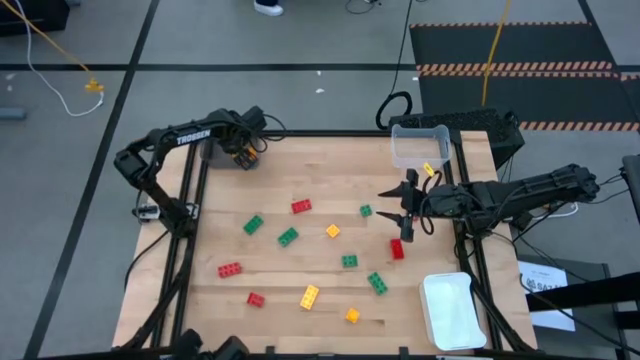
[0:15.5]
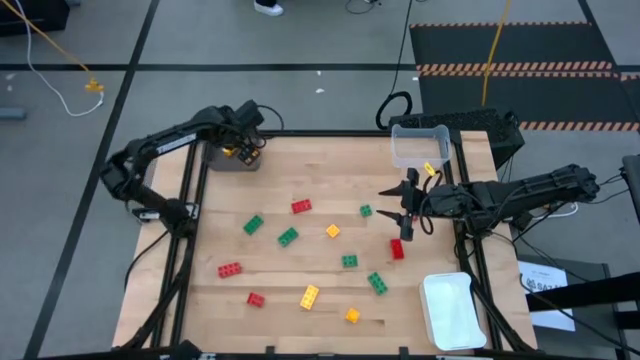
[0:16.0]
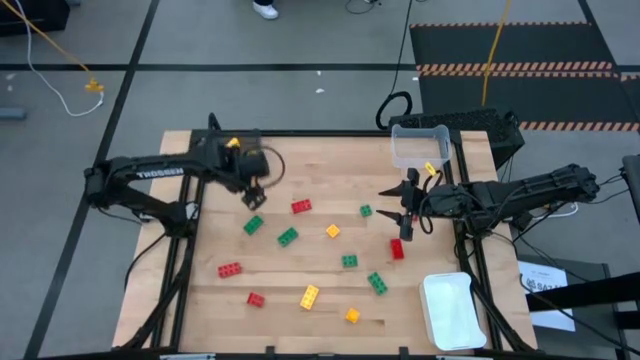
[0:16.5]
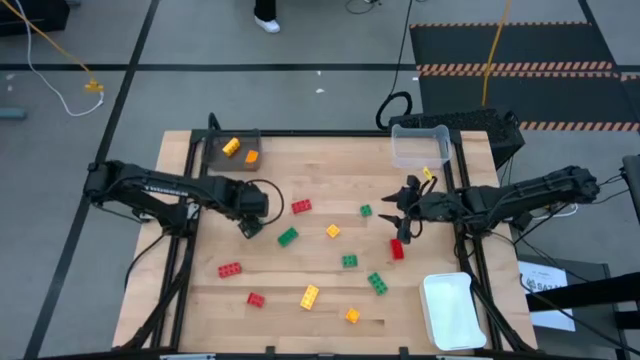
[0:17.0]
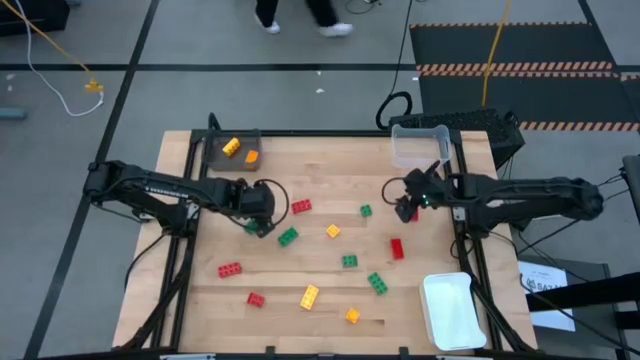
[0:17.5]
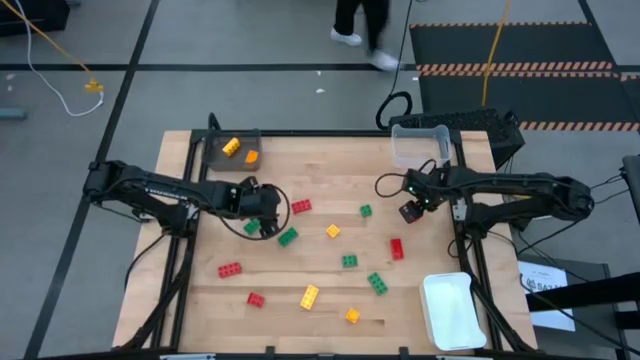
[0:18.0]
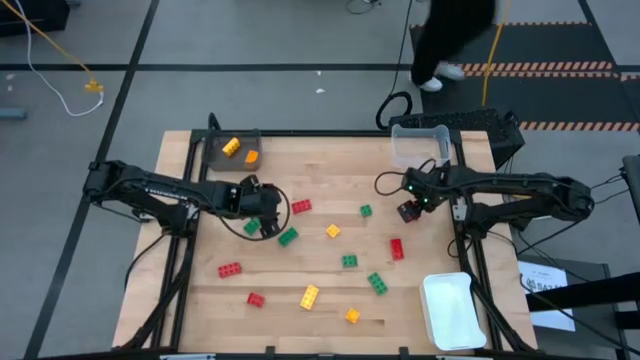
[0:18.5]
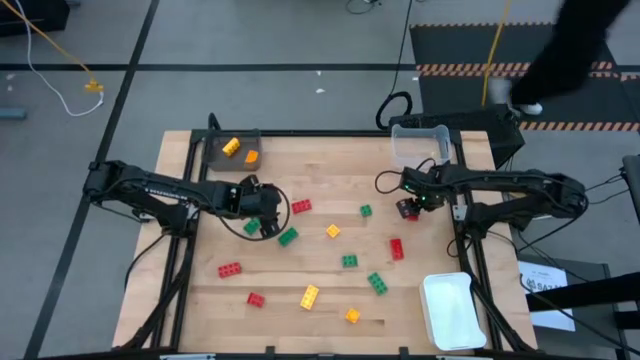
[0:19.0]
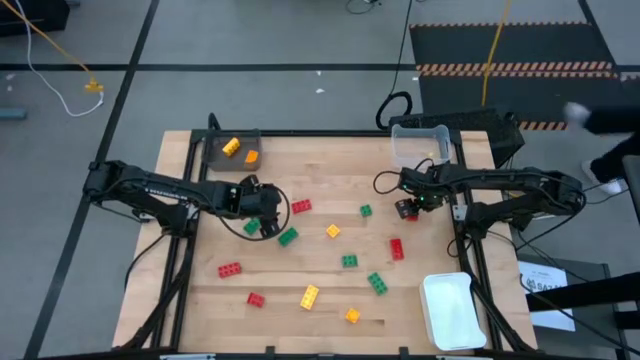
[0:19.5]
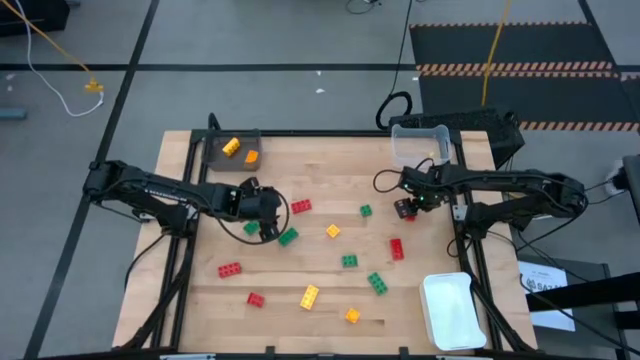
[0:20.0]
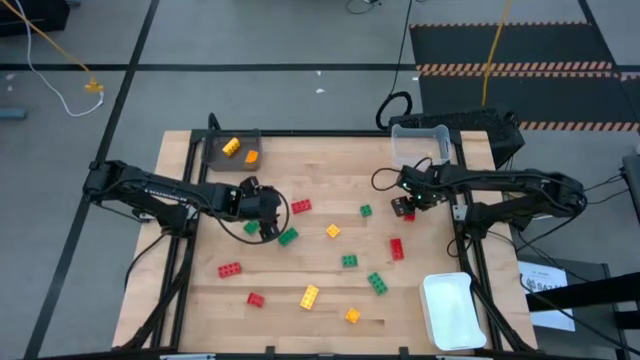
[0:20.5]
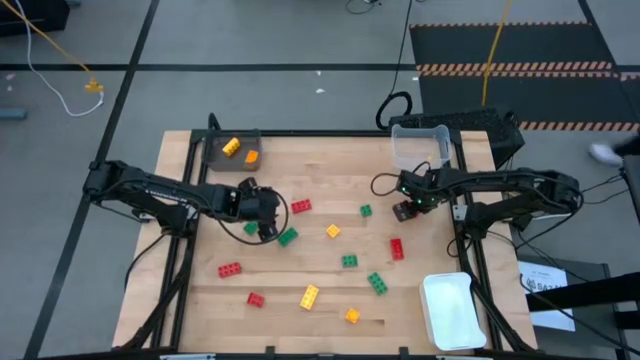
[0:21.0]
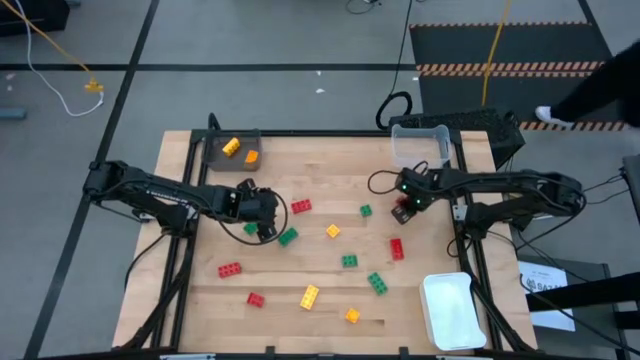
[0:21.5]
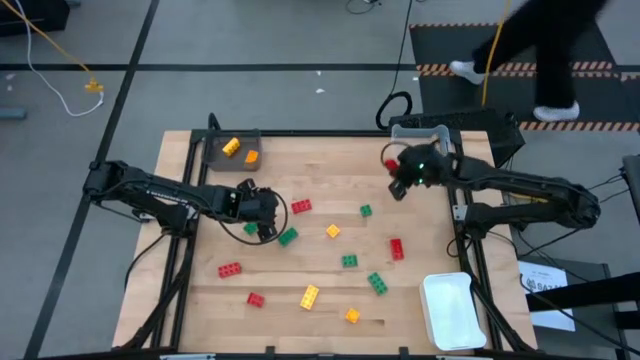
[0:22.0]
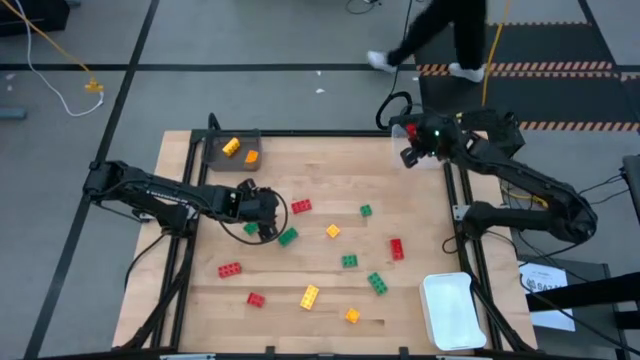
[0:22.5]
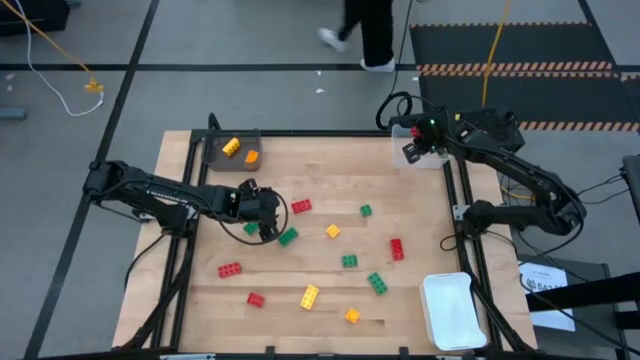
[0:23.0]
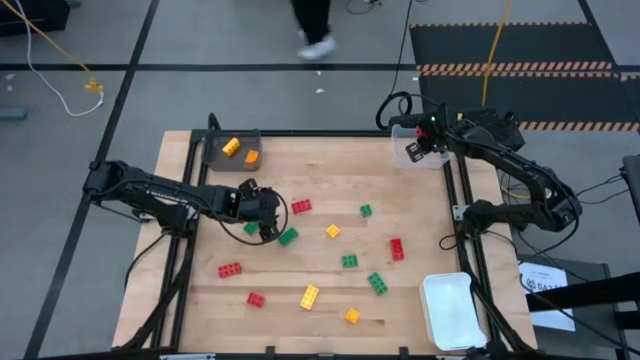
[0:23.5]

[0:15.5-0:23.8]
Task: Sort & place blocks by color
Put the red gamepiece into the transparent bin

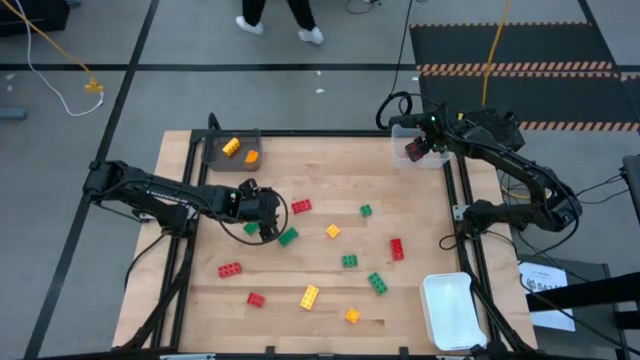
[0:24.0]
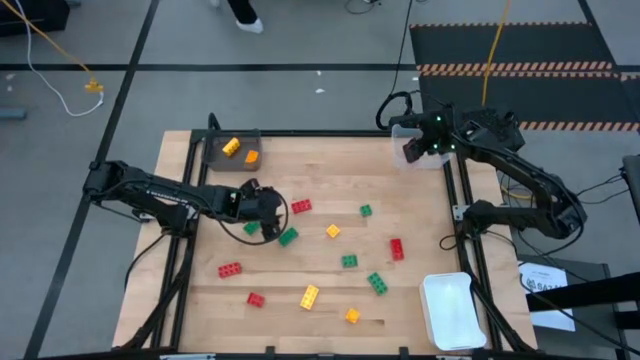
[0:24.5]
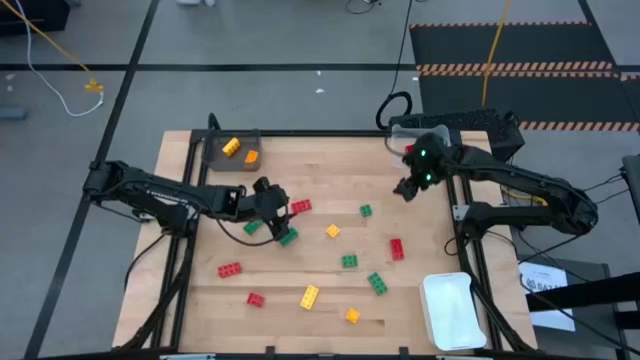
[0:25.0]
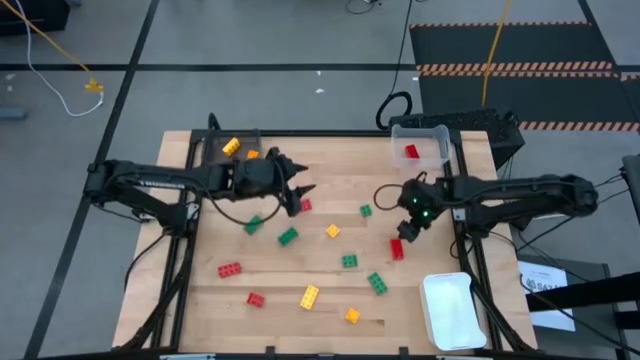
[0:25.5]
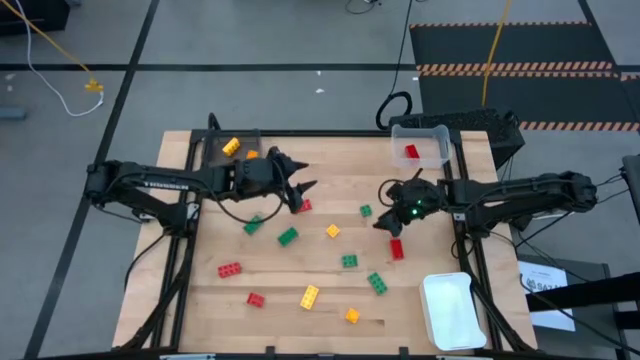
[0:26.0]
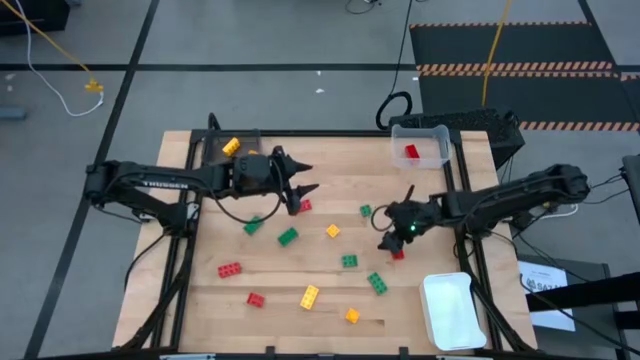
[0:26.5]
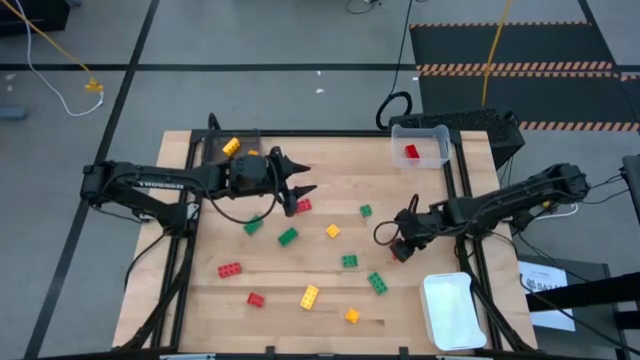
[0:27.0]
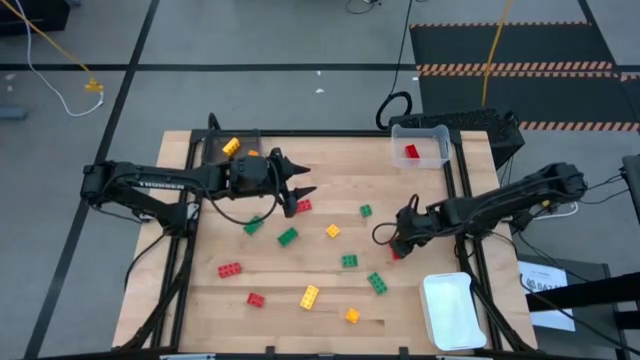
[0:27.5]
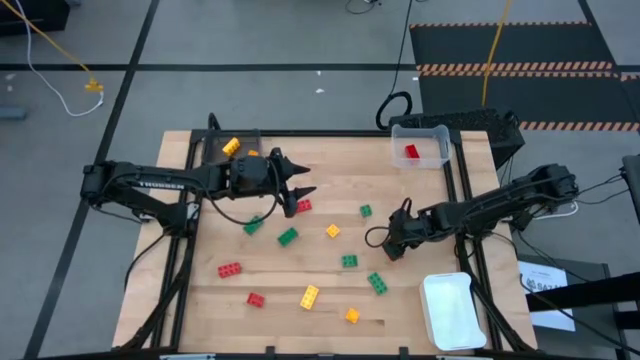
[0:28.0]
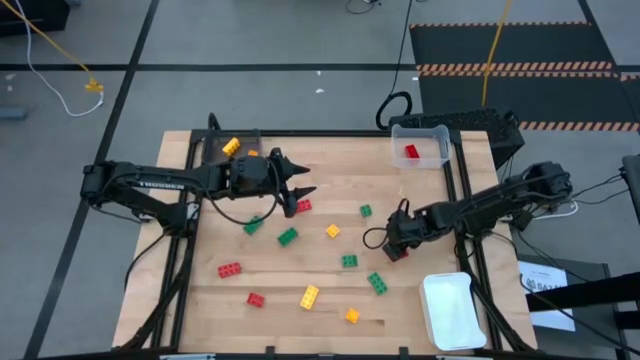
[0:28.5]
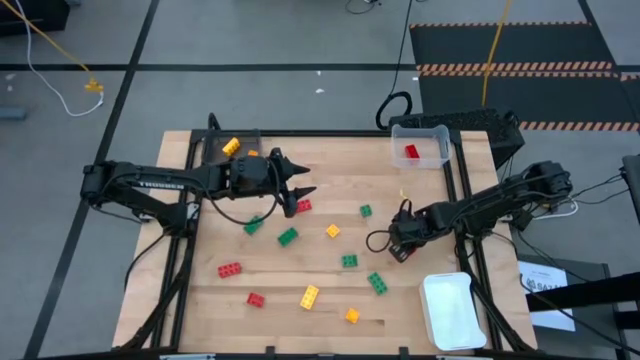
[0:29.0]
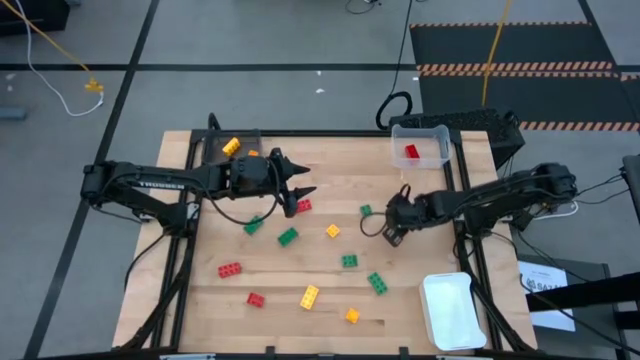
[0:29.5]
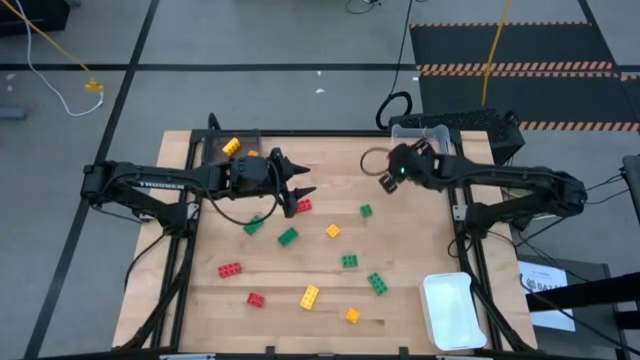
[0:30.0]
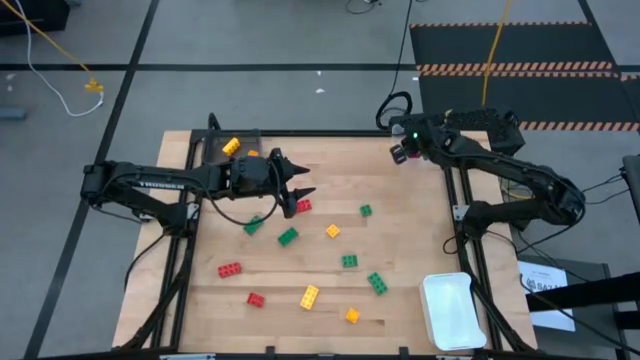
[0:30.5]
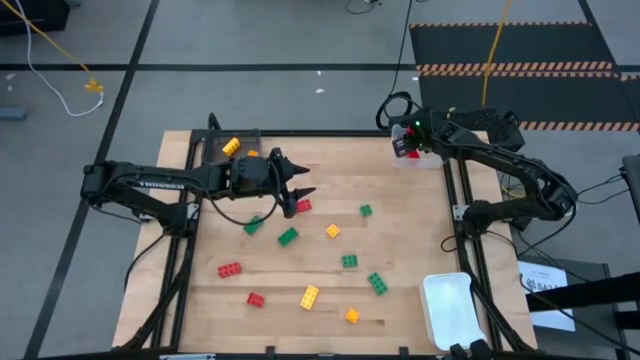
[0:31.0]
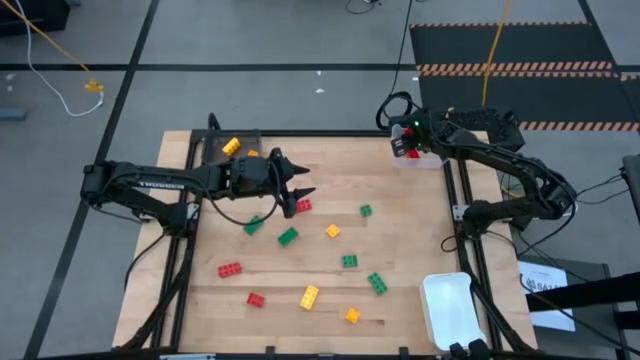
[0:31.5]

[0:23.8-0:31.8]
Put the red gamepiece into the transparent bin

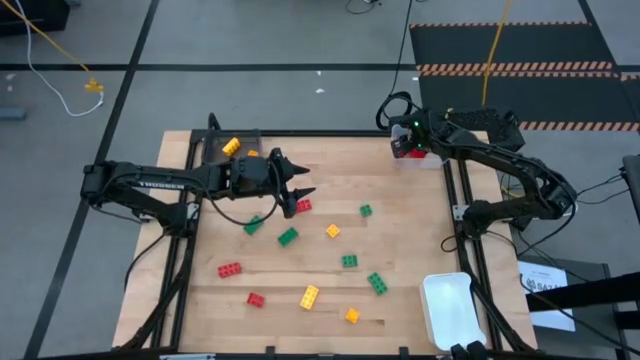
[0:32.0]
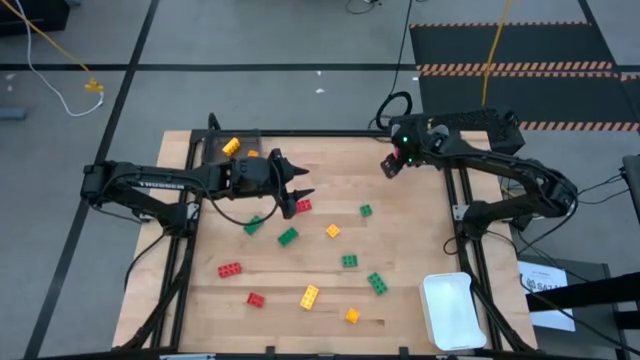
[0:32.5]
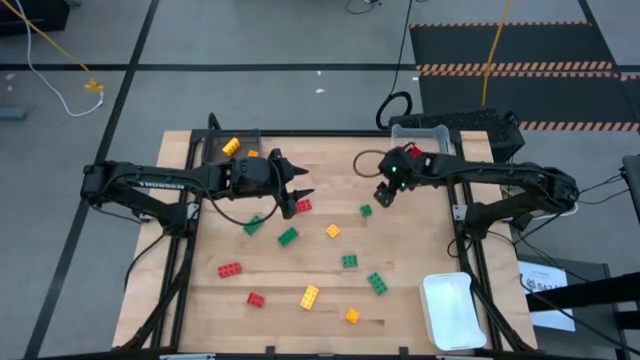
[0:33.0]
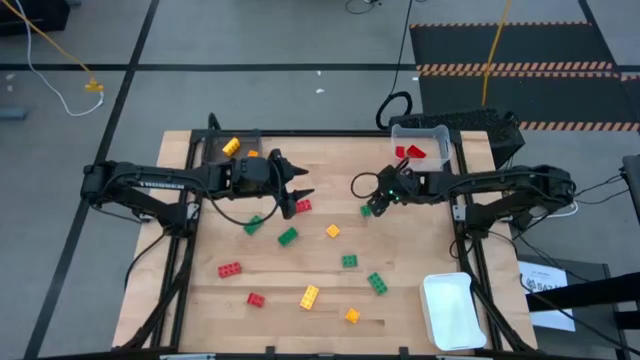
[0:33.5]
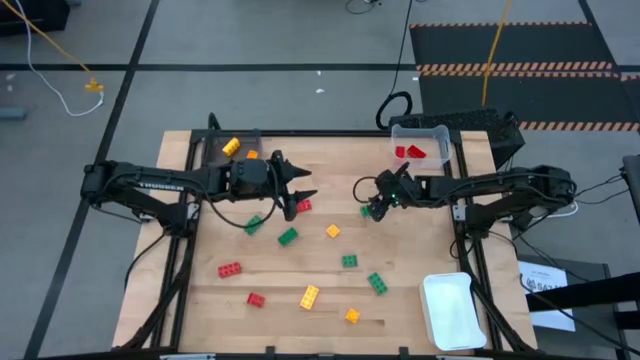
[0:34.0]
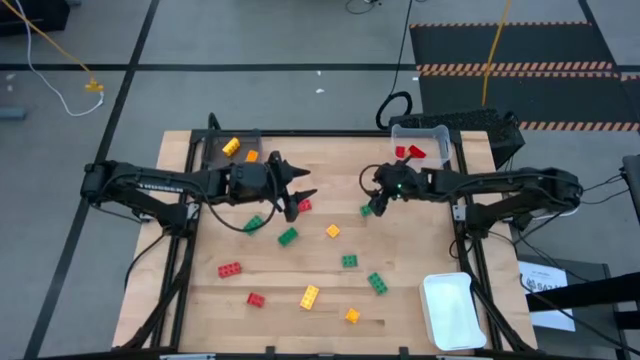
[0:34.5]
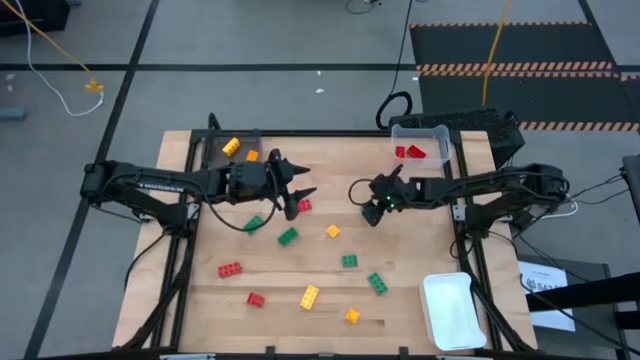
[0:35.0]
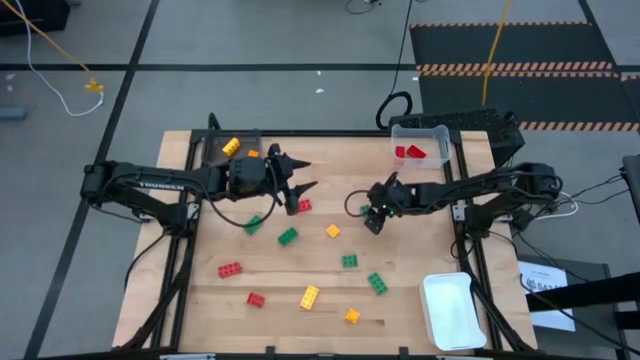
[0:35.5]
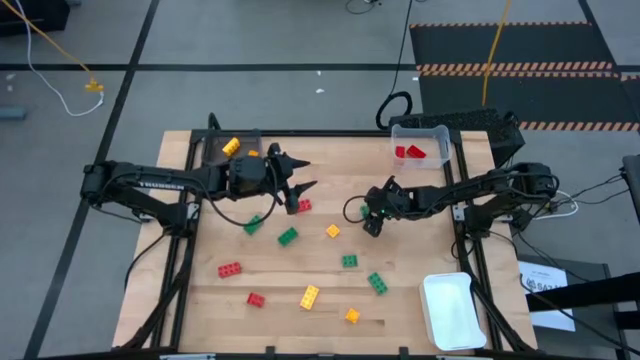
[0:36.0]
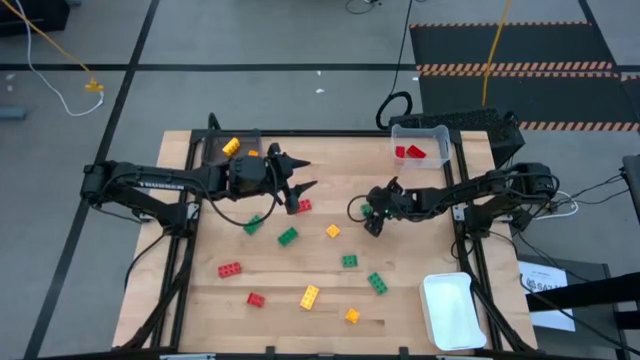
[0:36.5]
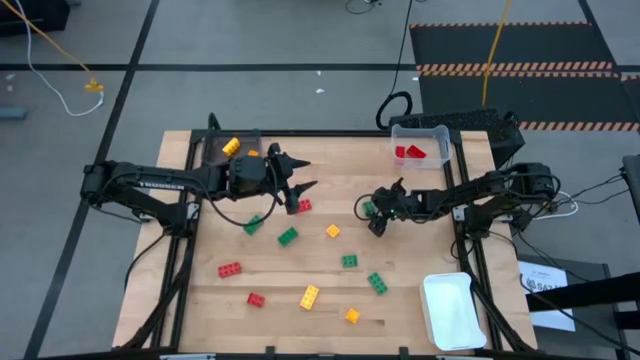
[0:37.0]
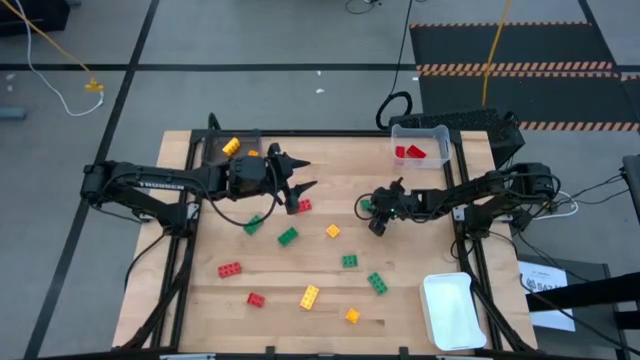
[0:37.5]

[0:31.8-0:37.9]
Put the green gamepiece into the white bin
